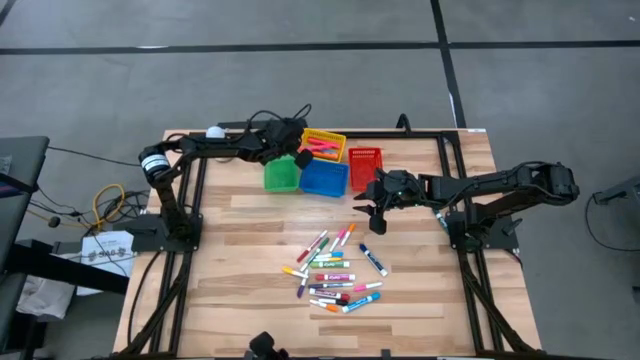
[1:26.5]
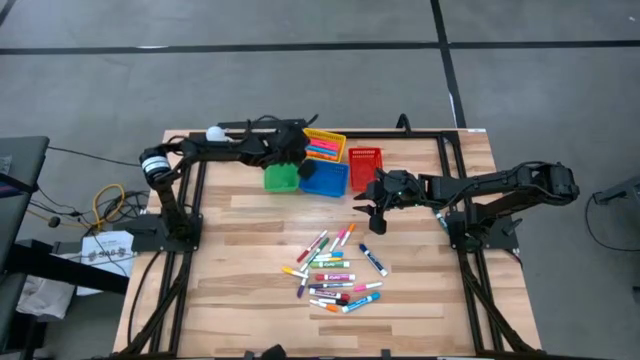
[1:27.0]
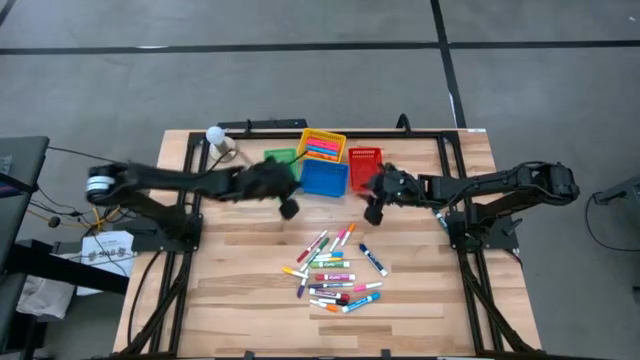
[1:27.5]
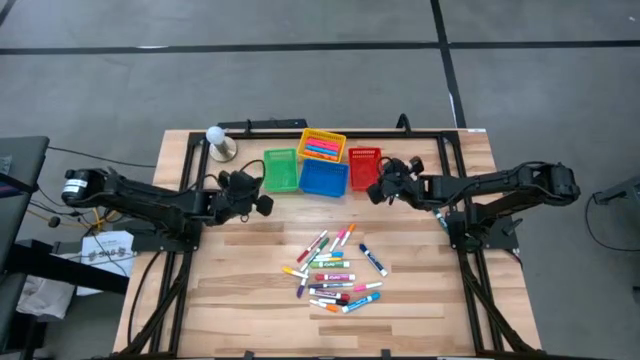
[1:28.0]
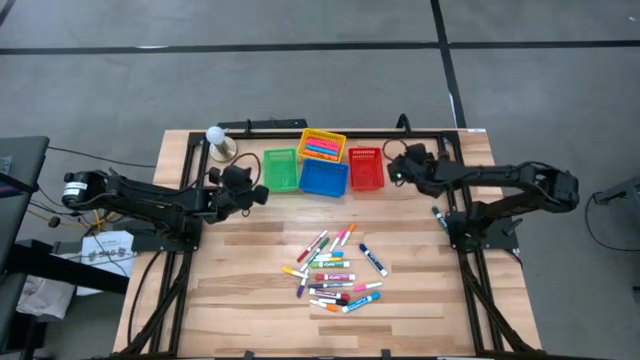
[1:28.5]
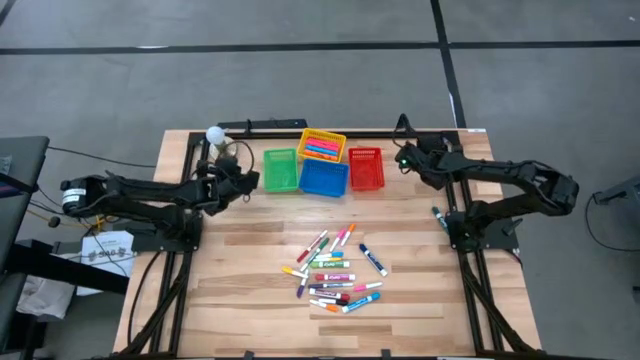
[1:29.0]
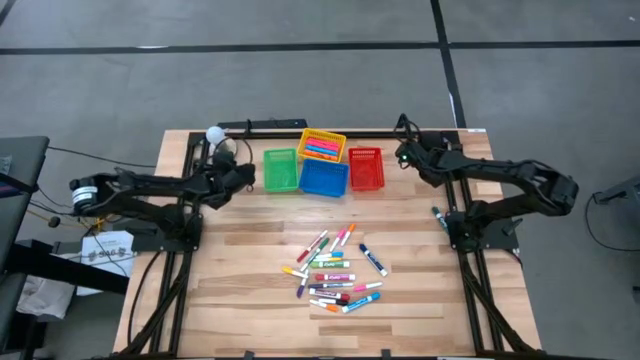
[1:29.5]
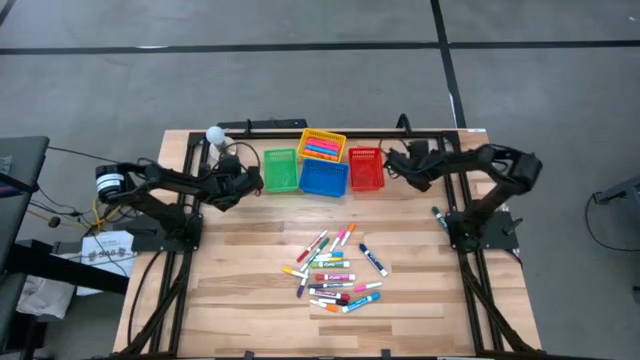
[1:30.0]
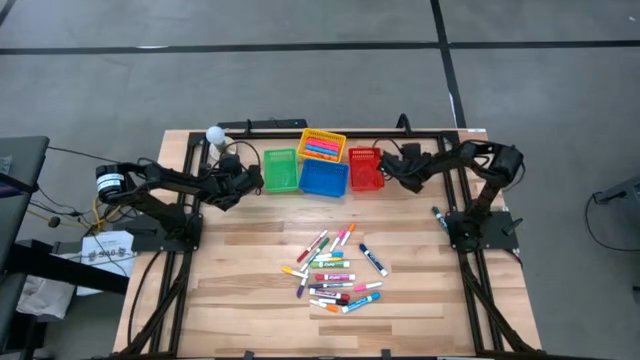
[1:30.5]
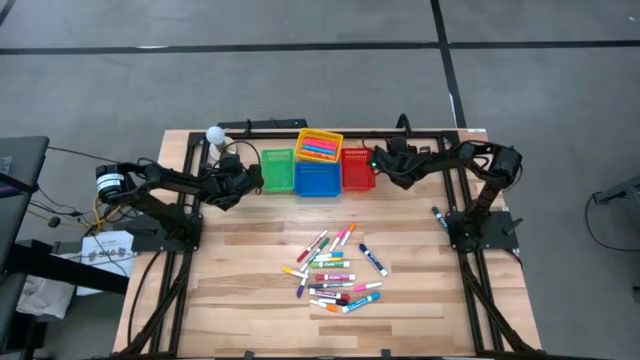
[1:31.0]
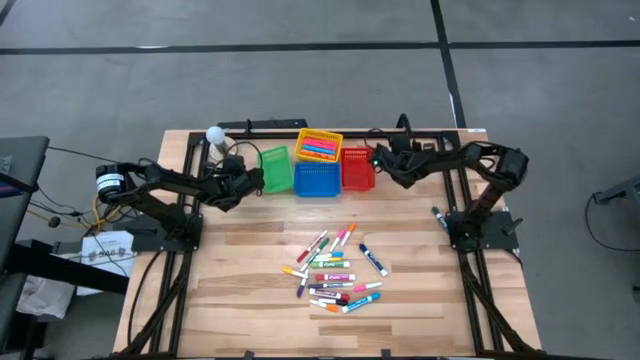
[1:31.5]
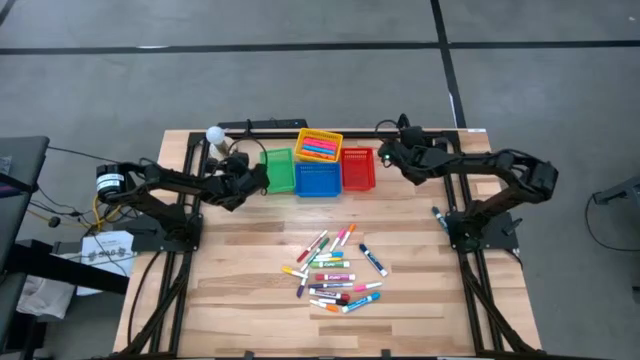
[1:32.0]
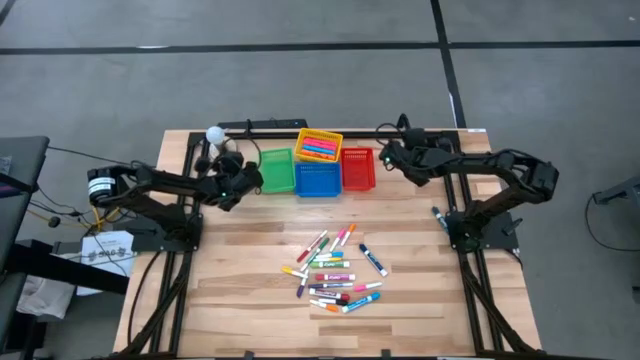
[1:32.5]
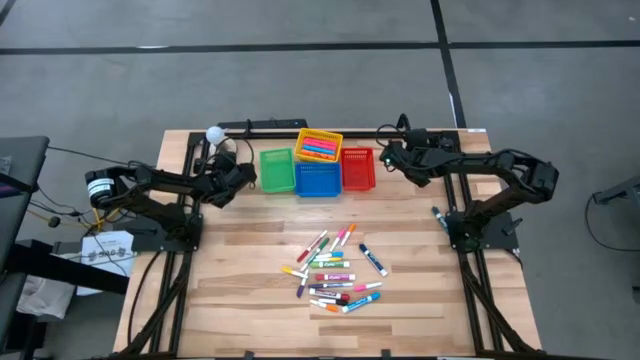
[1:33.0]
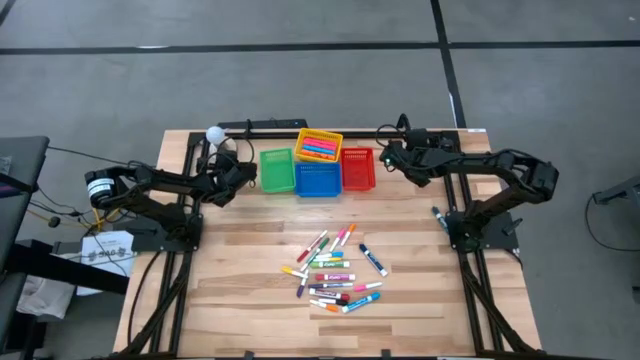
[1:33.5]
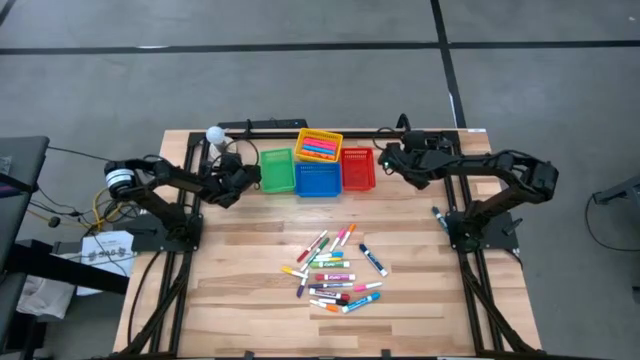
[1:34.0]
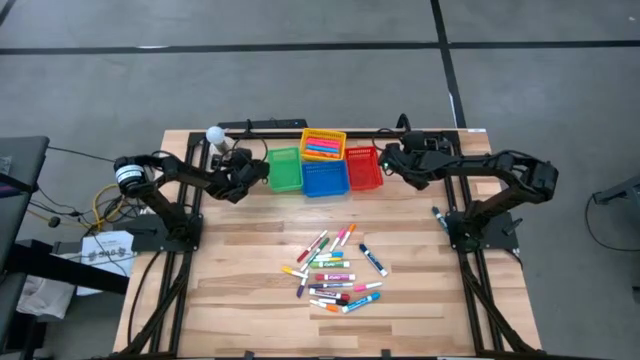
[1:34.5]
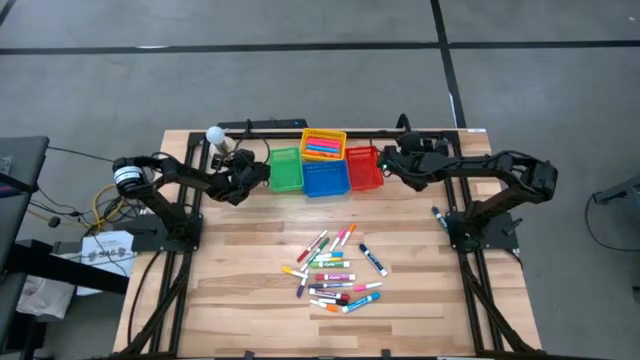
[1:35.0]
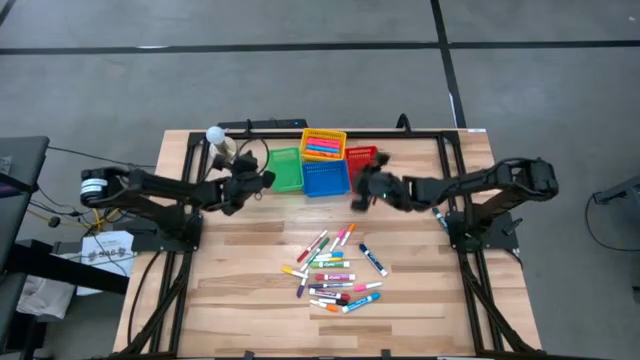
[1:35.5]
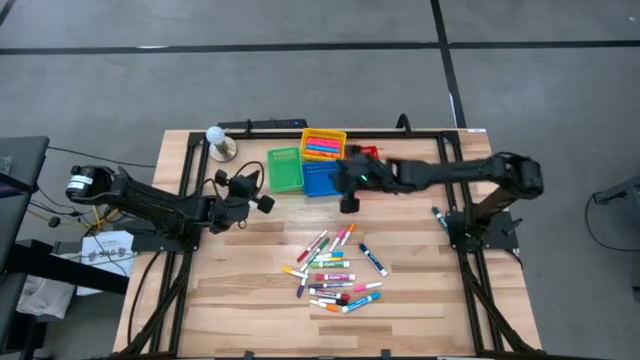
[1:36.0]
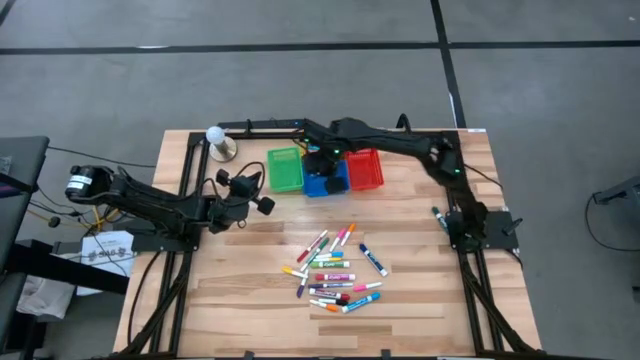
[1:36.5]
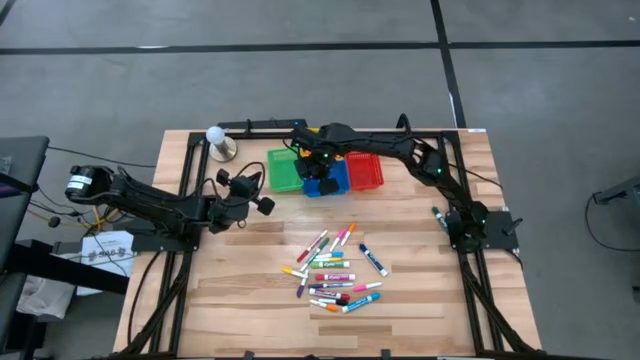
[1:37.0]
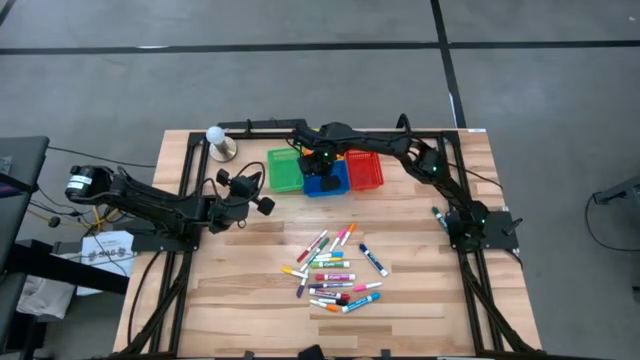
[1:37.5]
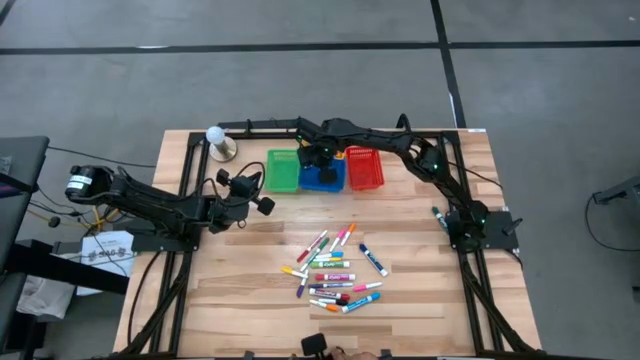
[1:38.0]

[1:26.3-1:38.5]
Task: Pick & Place Markers
Adjust the colored bins on the table

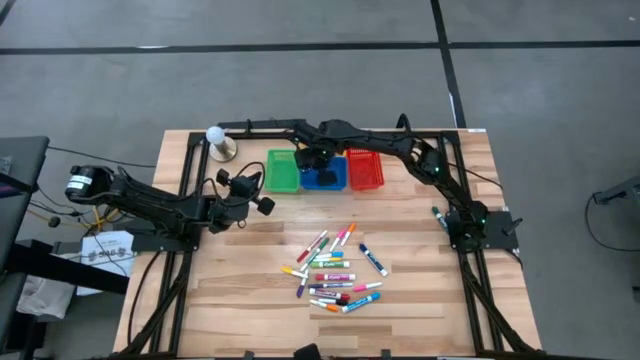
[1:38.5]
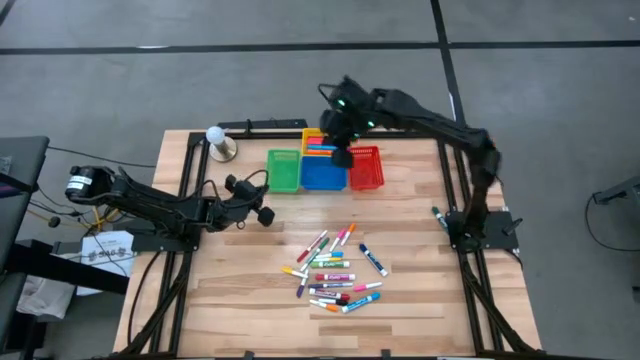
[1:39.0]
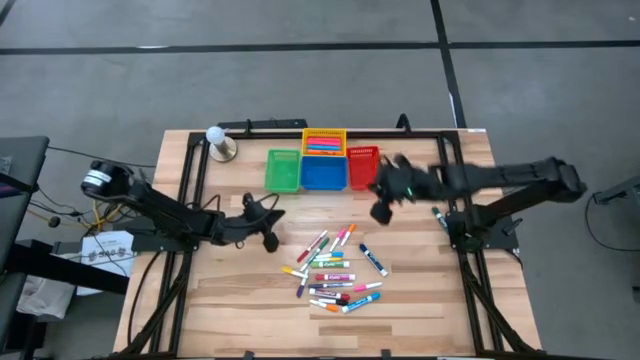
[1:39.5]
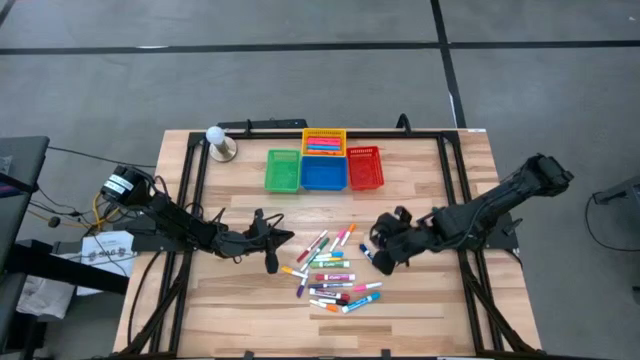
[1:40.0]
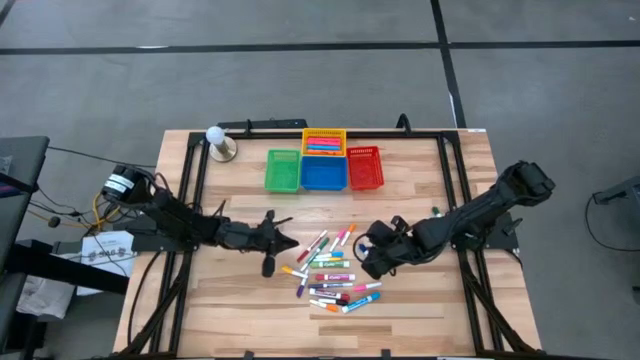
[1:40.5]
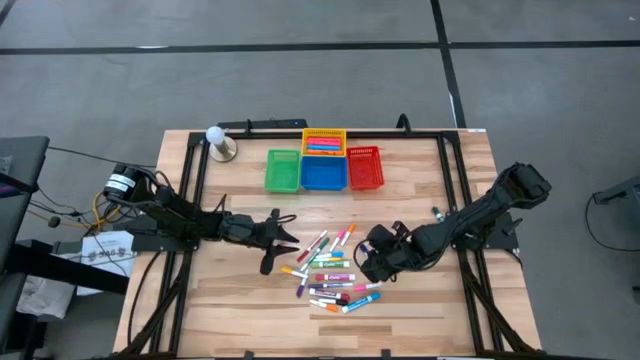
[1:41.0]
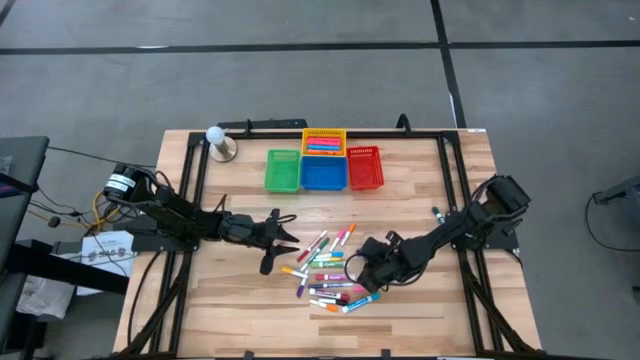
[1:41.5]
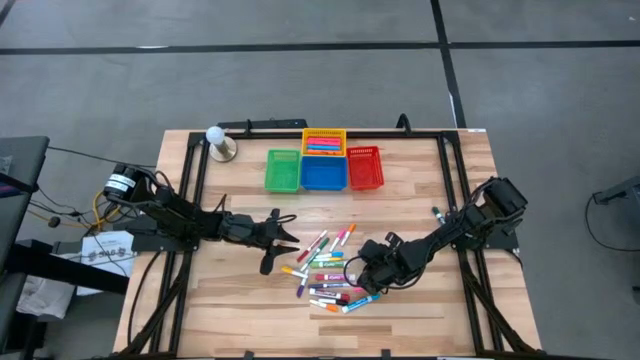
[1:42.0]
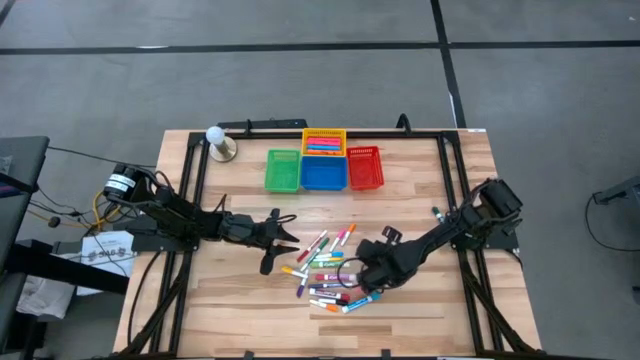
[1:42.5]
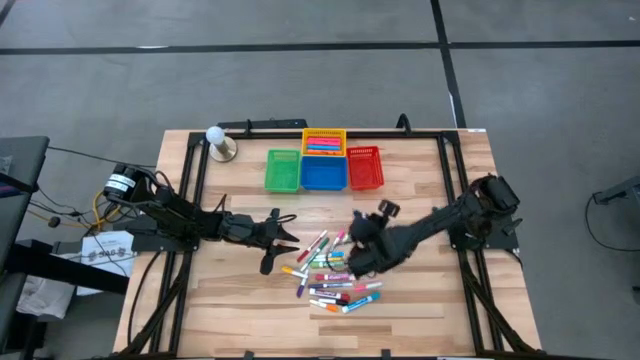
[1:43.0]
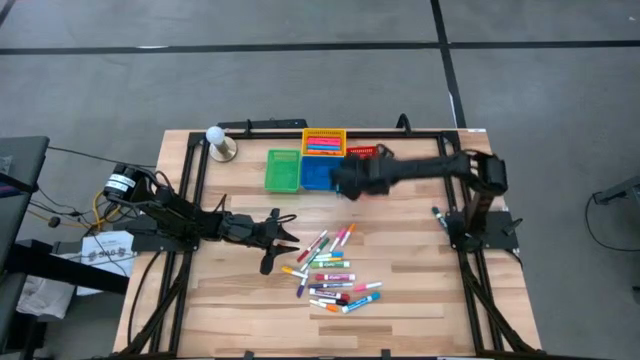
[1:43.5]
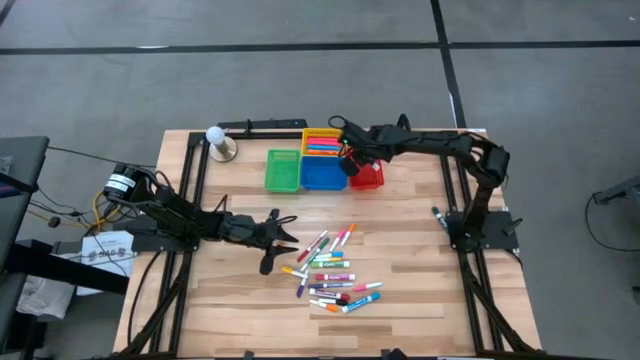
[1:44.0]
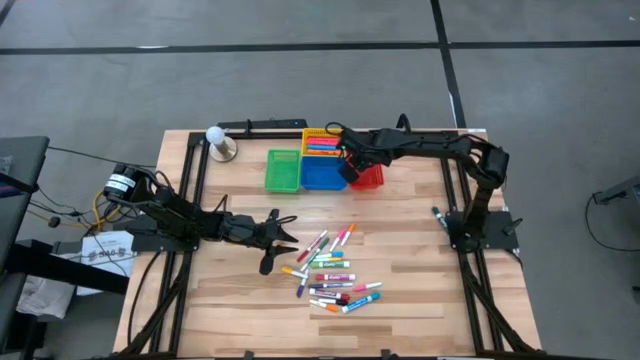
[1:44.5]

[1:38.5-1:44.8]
Put the large blue marker pen into the red bin

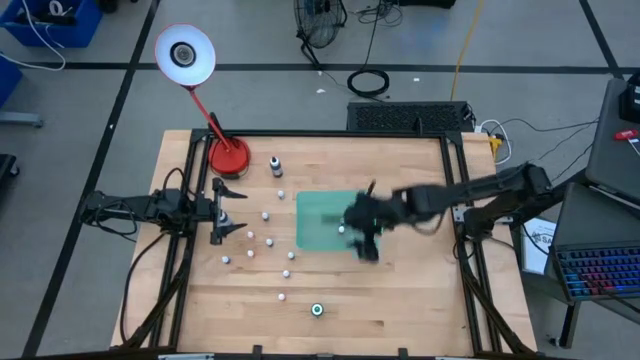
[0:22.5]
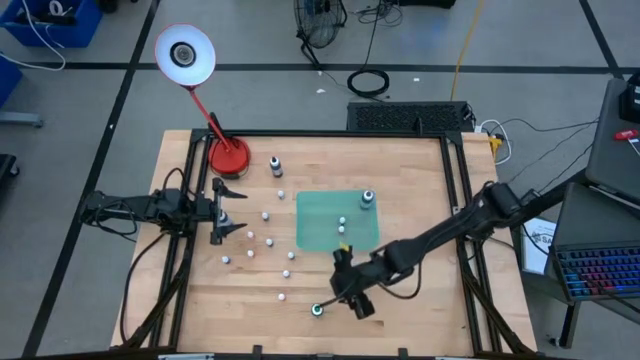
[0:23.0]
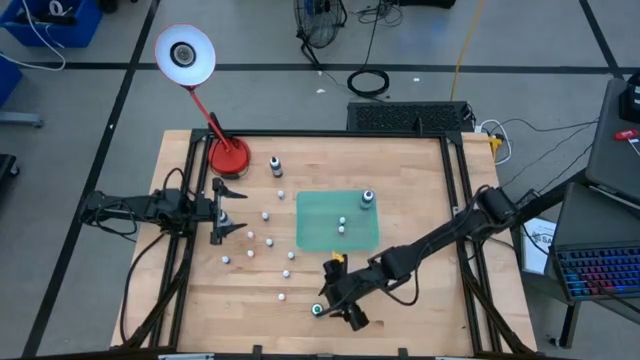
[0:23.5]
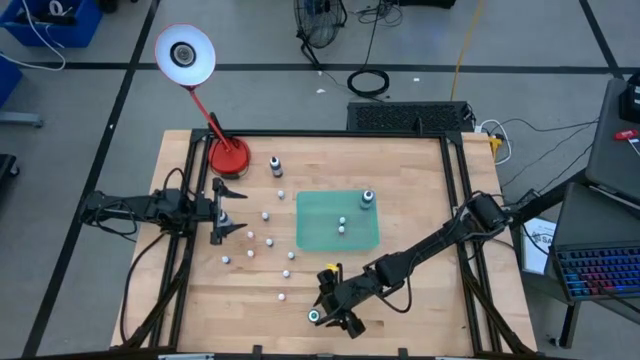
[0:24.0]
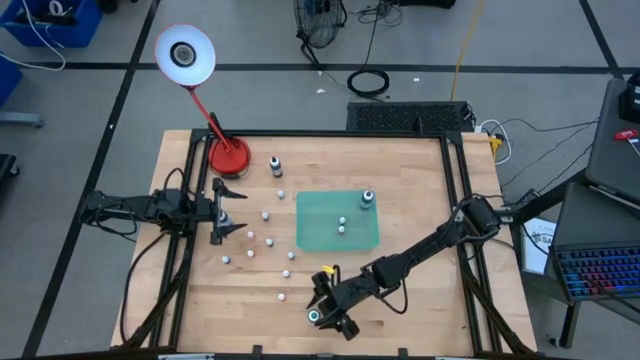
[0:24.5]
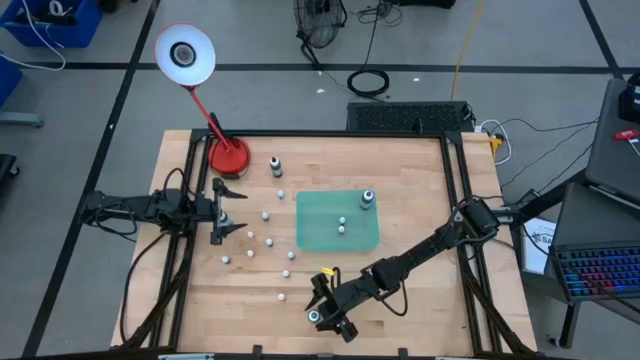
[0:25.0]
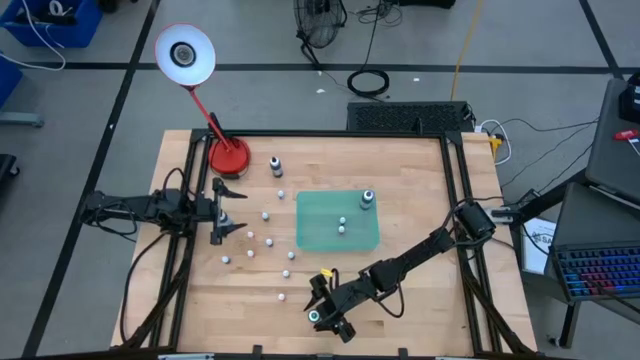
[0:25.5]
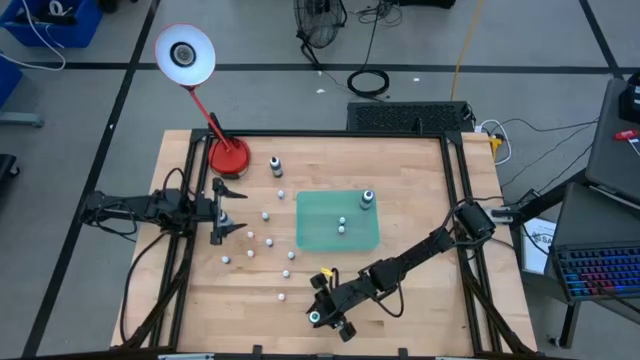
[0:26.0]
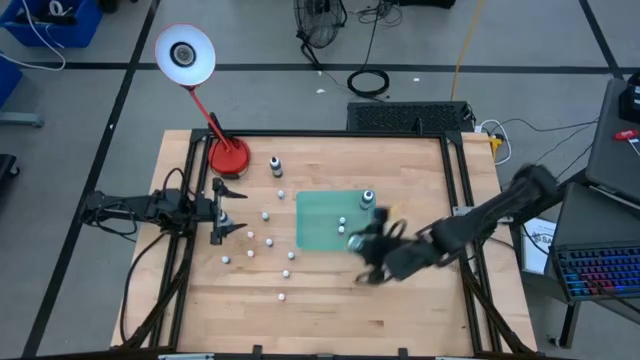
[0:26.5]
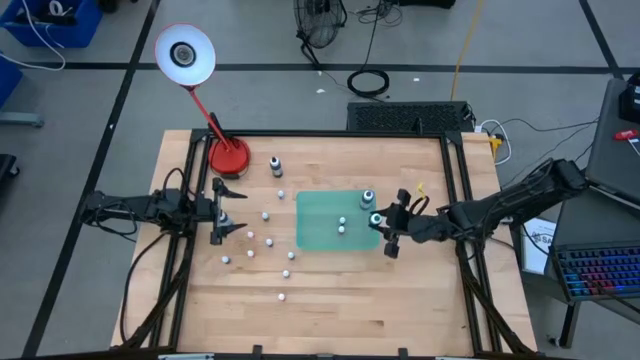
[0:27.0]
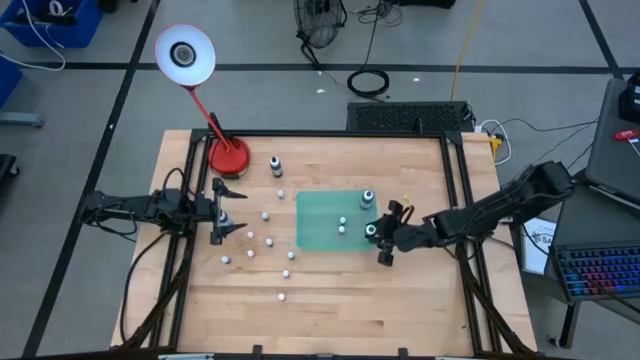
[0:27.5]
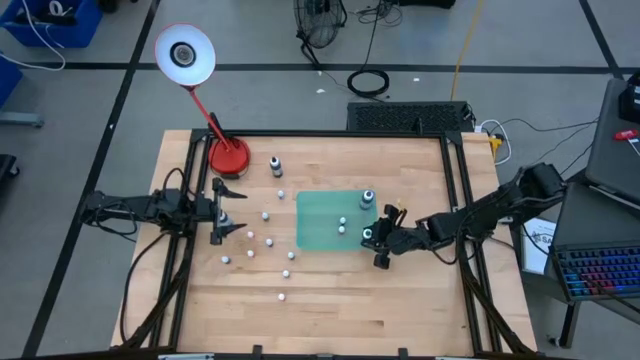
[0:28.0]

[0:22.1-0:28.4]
Task: Pick & Place food coloring
Put the big green food coloring bottle into the blue bin
